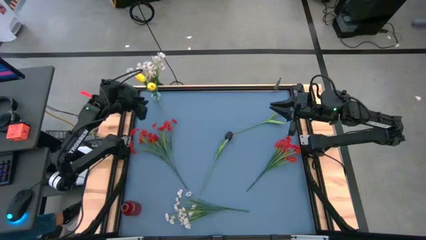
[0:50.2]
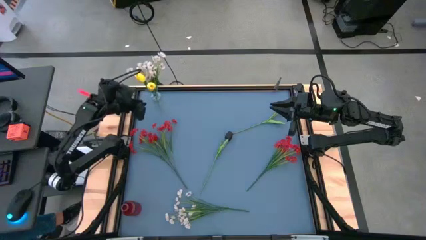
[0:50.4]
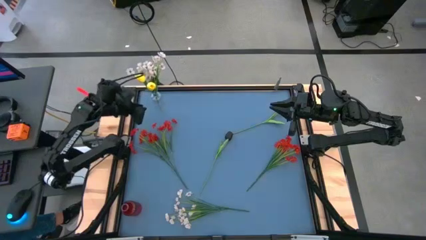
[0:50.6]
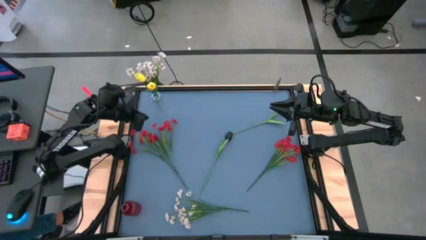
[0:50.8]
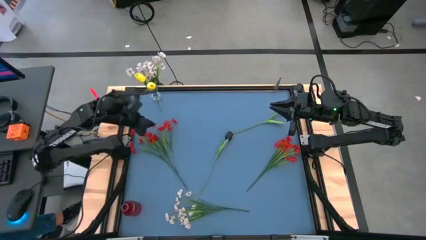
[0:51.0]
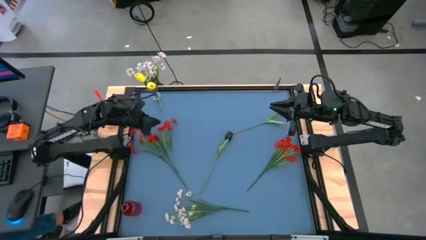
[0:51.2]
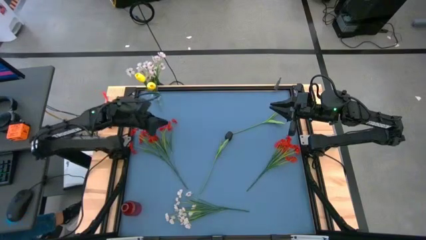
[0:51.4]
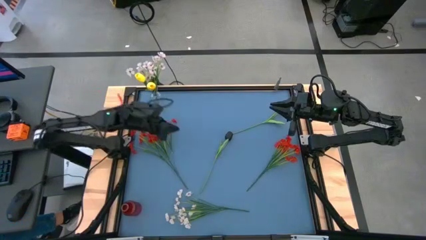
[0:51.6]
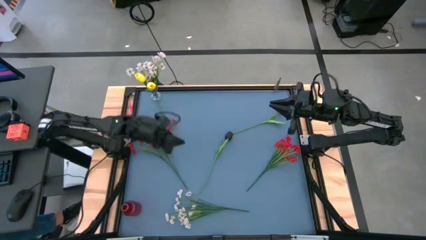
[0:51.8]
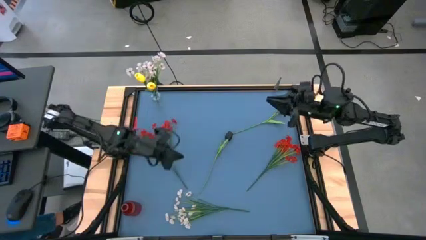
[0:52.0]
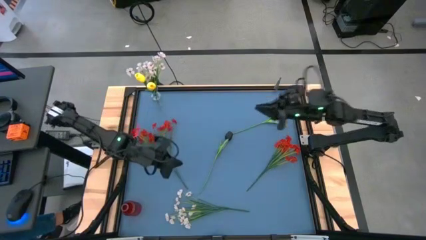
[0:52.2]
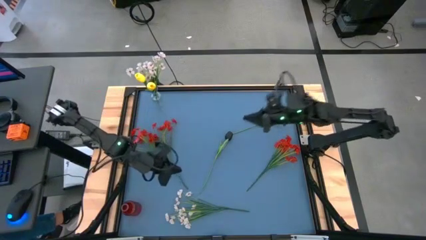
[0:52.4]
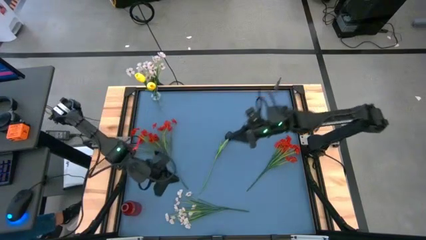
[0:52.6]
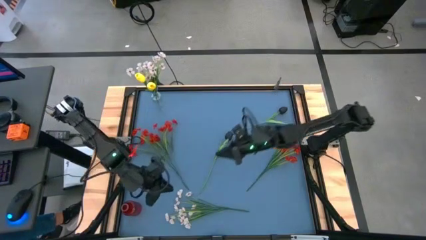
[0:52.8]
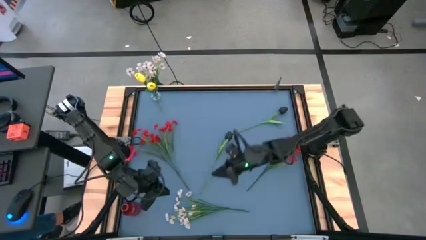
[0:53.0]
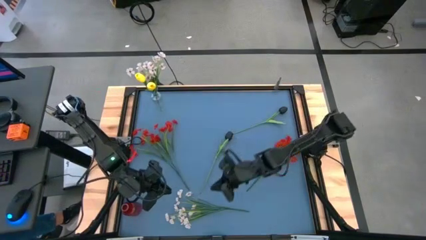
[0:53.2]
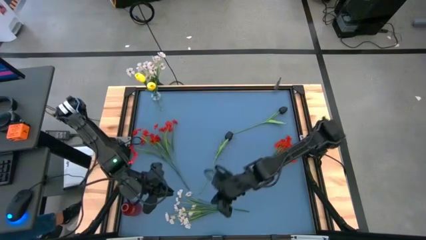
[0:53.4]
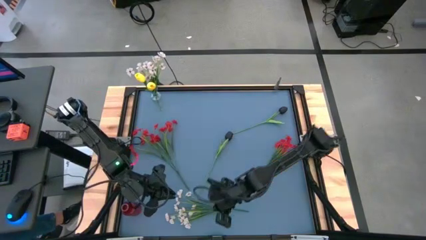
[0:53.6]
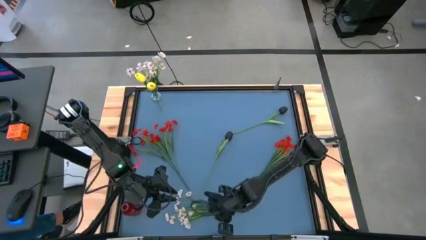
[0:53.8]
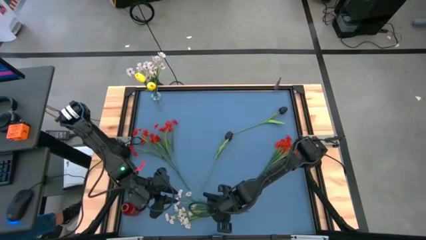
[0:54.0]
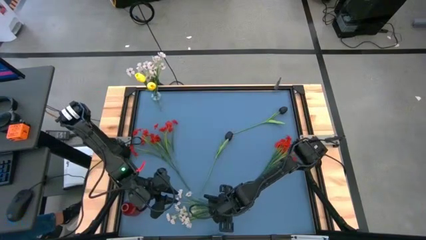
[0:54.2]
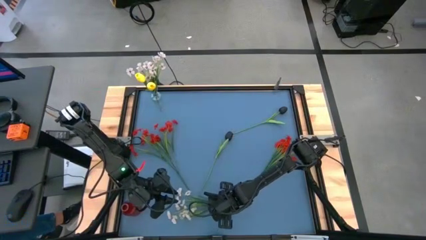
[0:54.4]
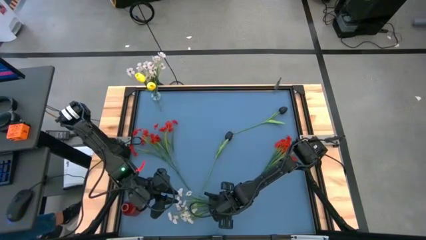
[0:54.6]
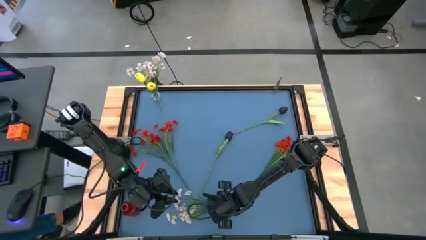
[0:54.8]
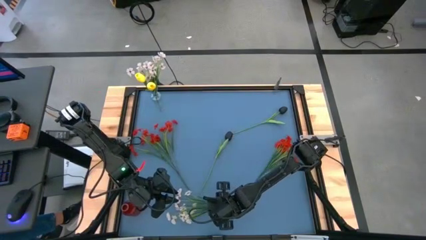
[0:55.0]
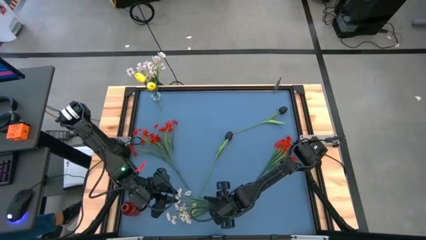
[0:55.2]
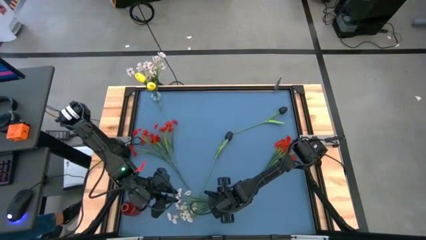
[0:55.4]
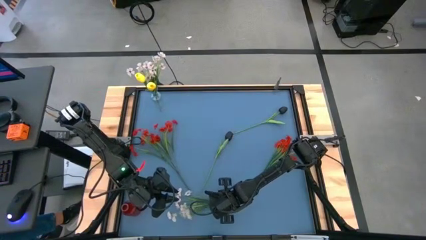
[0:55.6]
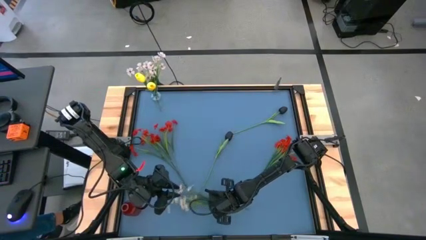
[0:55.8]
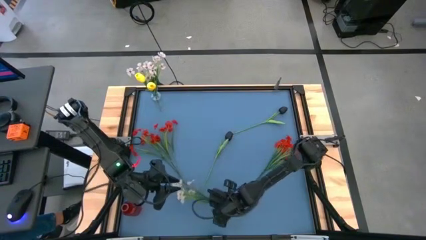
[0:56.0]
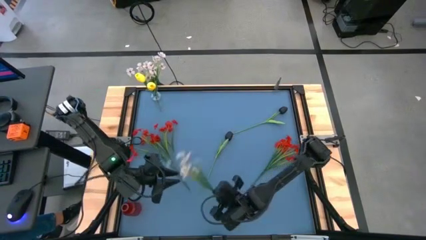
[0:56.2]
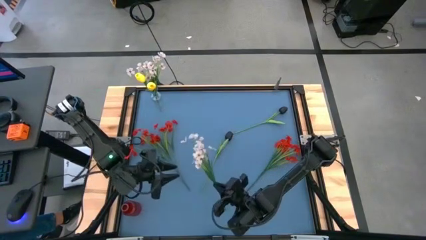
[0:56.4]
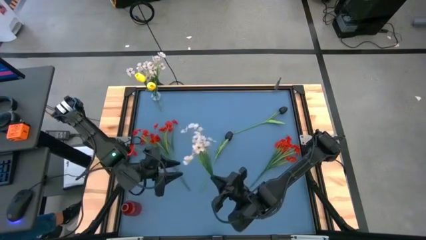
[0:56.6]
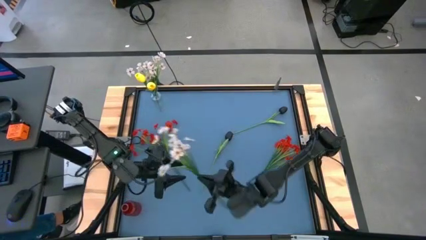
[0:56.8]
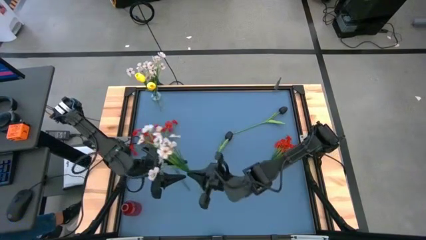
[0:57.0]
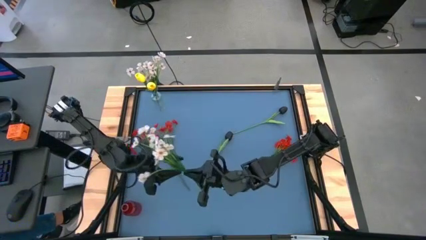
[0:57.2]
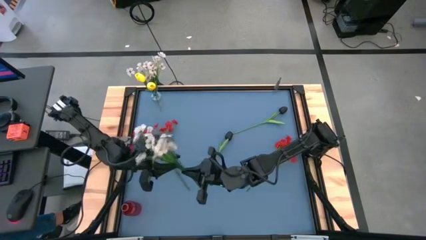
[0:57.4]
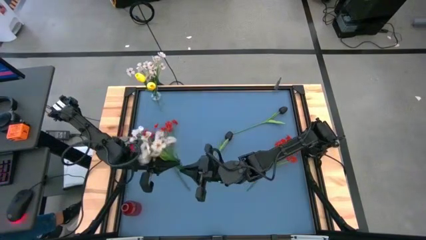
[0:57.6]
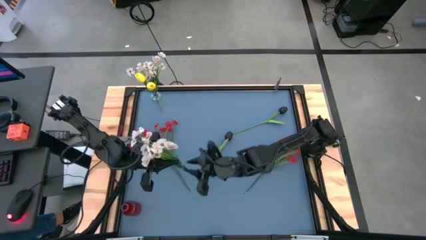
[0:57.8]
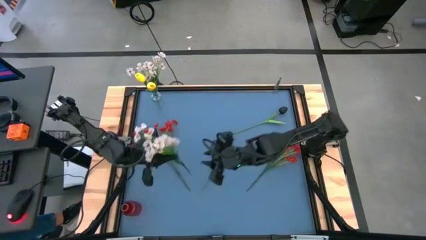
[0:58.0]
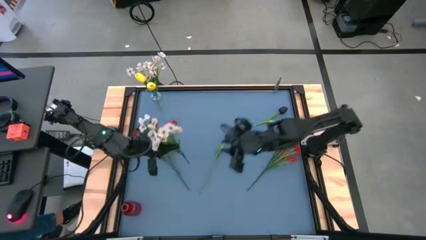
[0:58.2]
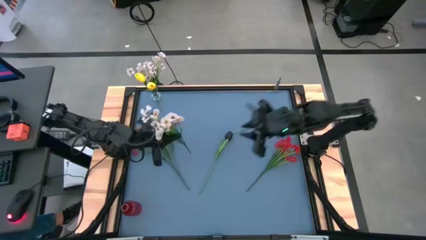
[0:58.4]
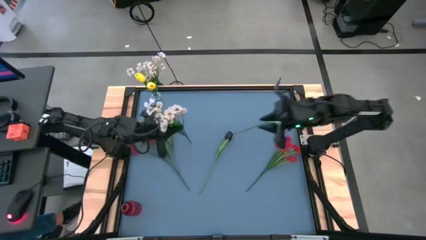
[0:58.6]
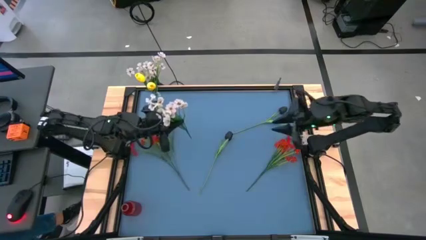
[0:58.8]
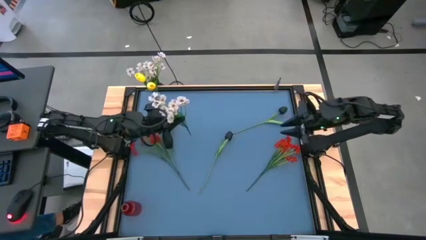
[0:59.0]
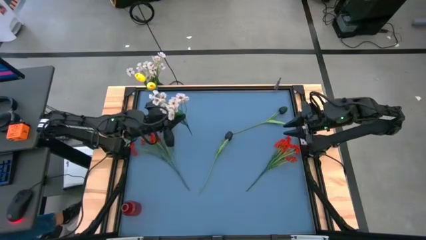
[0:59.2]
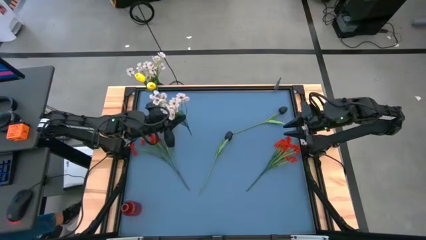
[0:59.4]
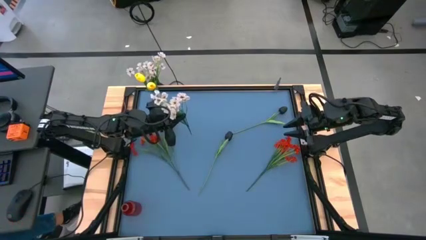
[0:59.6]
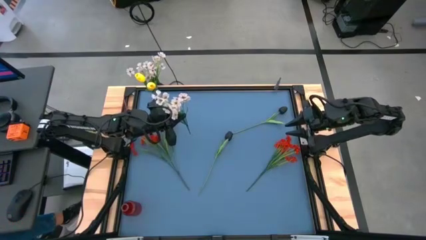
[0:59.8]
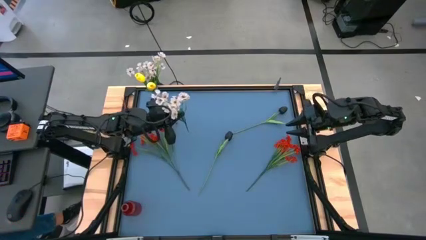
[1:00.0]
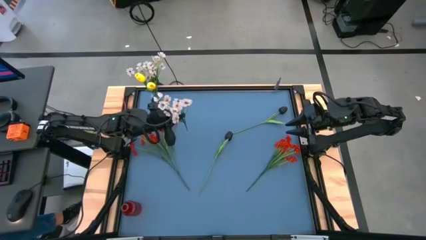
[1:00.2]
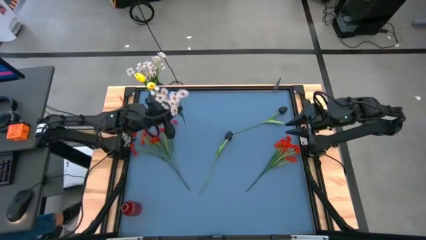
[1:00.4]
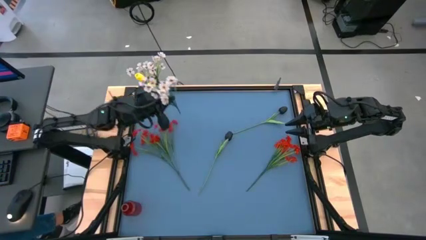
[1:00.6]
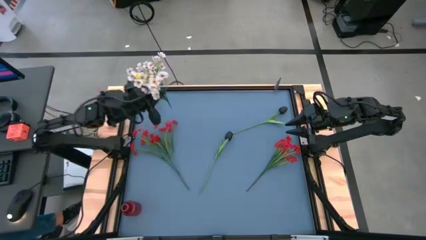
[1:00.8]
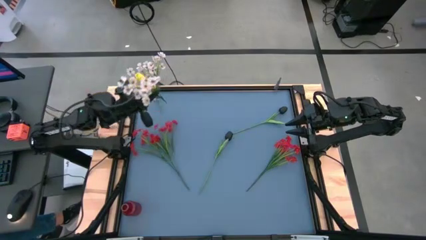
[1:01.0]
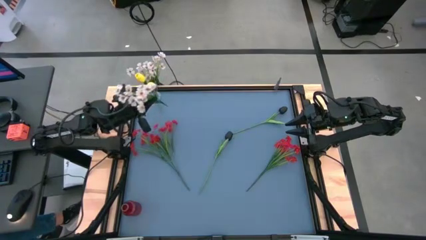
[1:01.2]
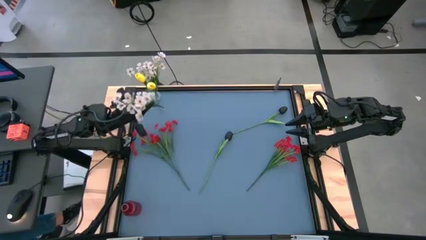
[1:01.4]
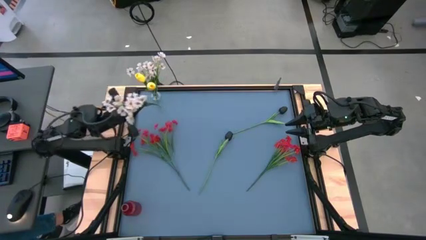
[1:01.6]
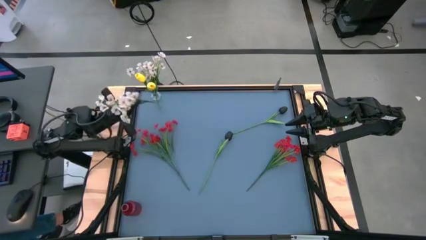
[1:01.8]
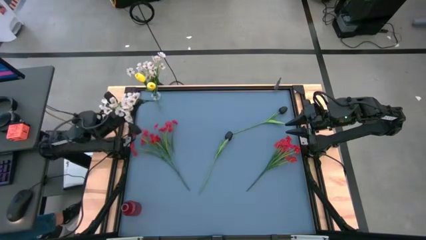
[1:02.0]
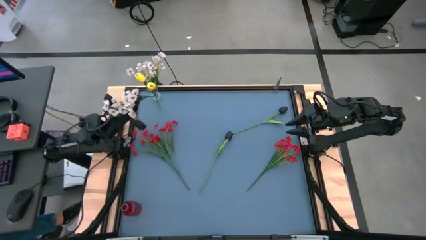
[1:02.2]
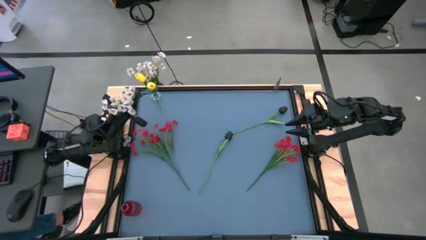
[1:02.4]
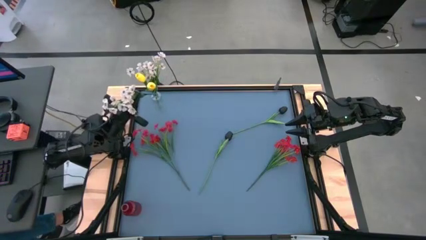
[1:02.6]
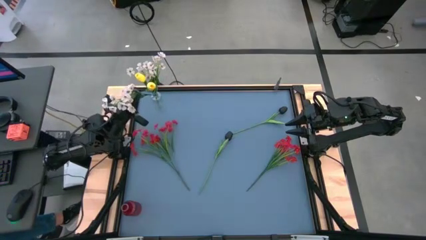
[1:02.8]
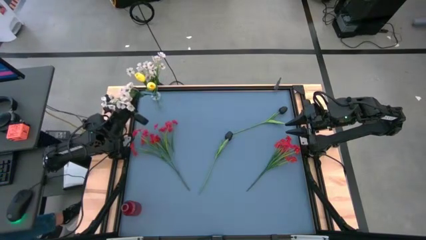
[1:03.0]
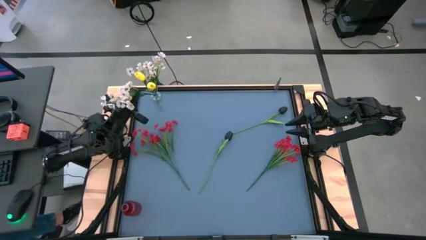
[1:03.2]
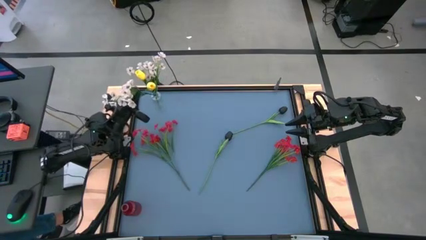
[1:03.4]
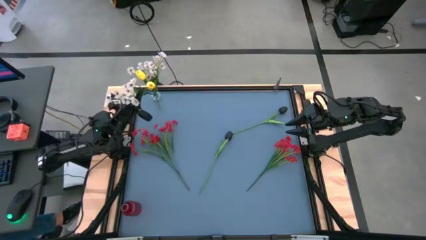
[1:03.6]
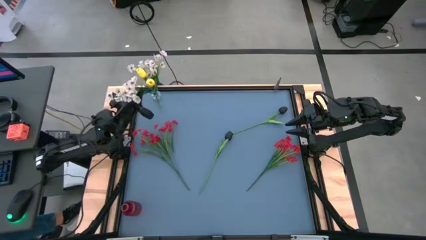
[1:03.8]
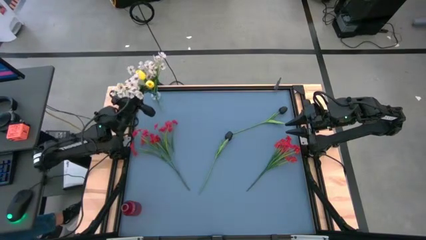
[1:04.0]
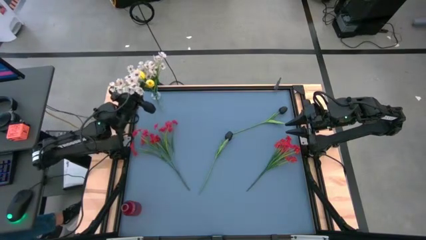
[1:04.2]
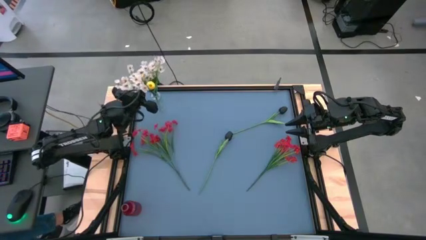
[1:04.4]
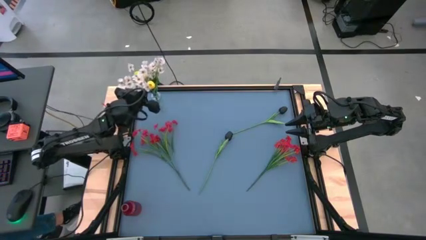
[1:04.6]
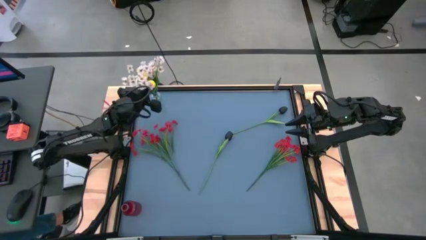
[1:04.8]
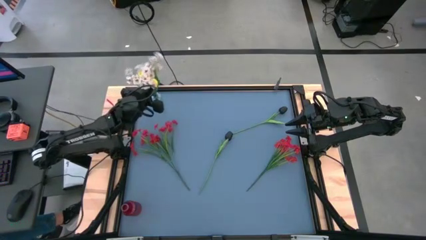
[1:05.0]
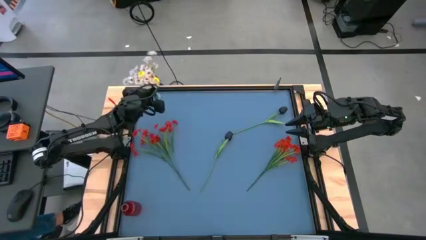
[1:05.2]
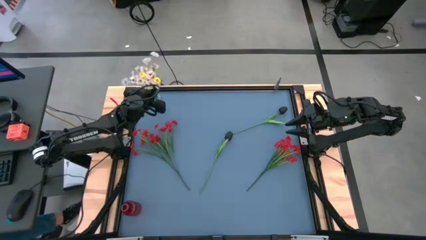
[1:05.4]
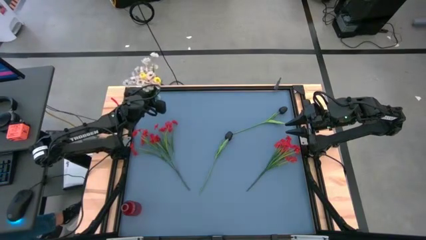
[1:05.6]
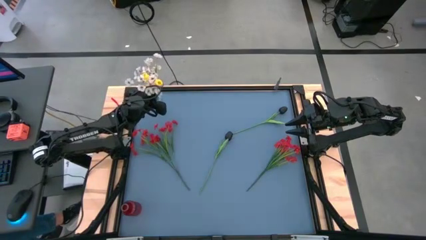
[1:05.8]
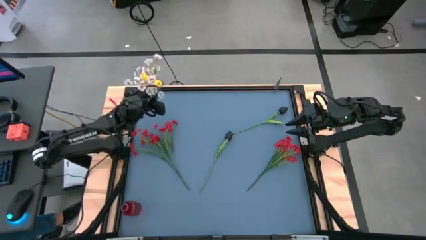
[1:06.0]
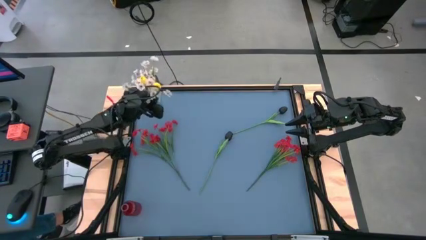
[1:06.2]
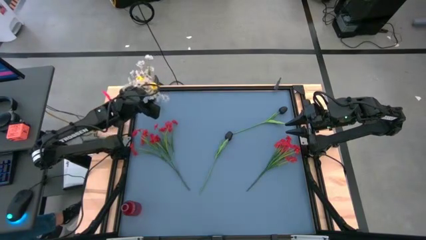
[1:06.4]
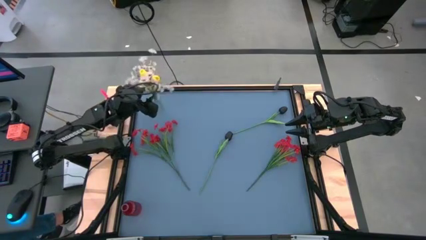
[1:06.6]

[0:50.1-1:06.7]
Task: Sort flowers into vase by color
Put the white flowers into the transparent vase
